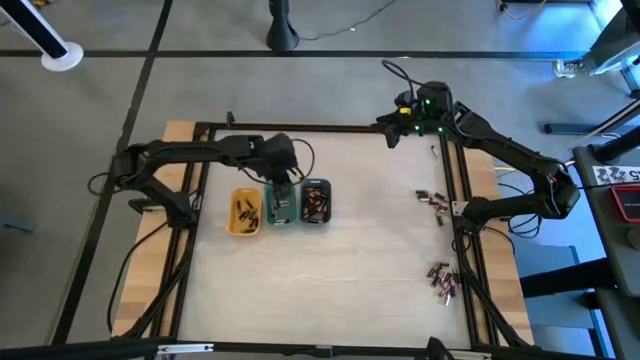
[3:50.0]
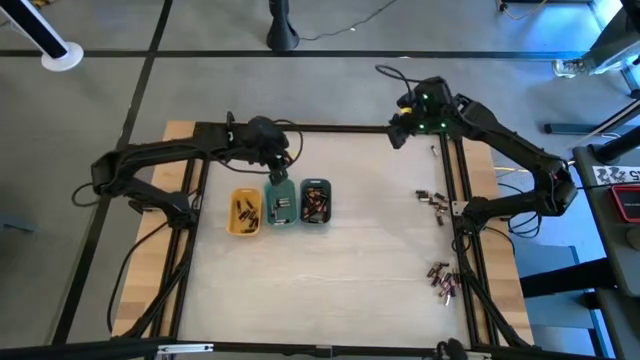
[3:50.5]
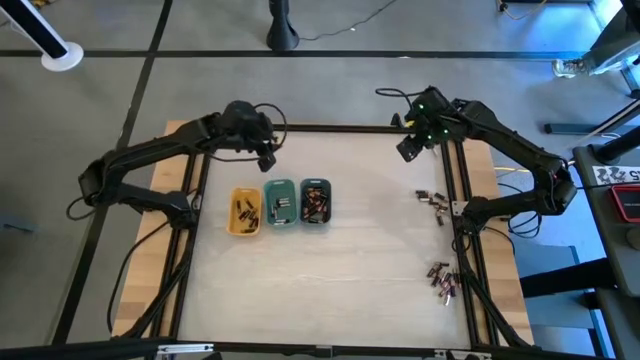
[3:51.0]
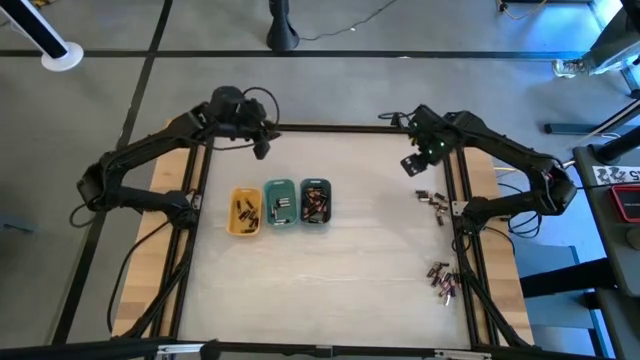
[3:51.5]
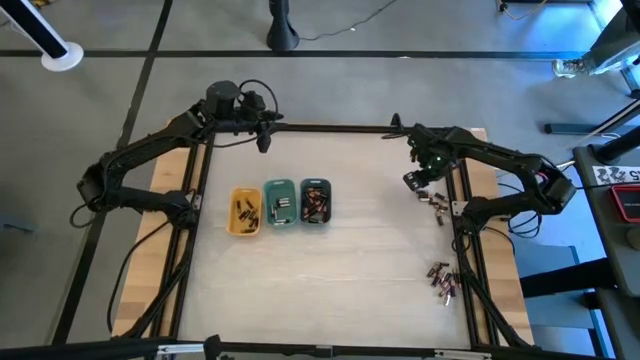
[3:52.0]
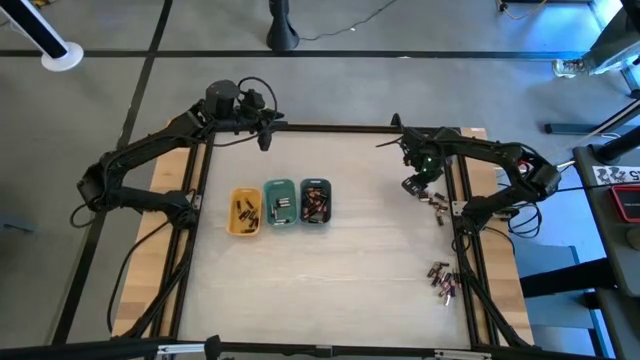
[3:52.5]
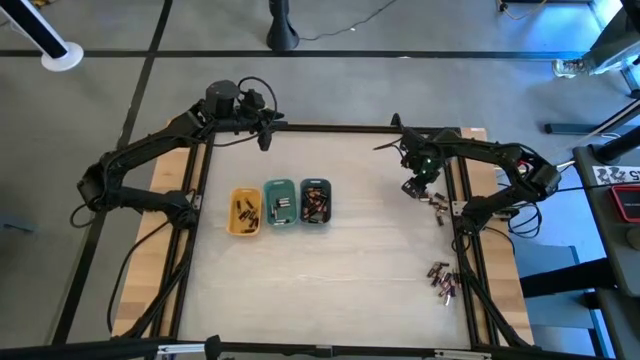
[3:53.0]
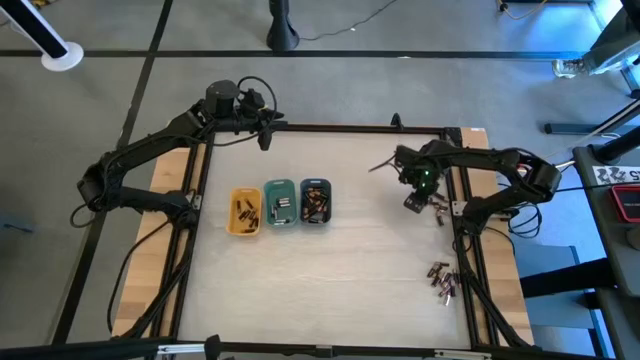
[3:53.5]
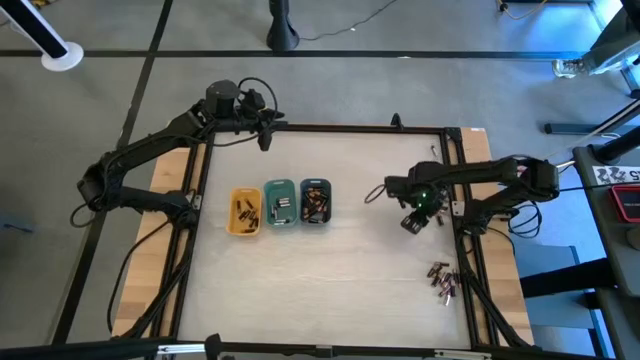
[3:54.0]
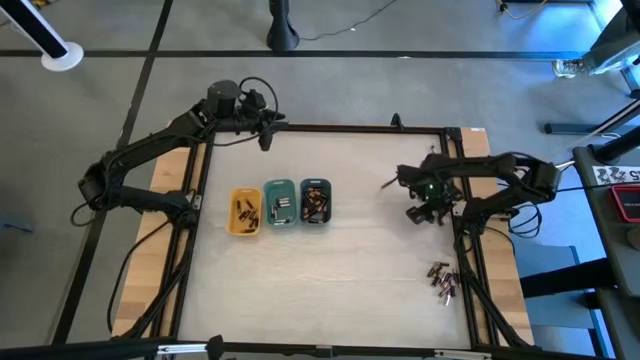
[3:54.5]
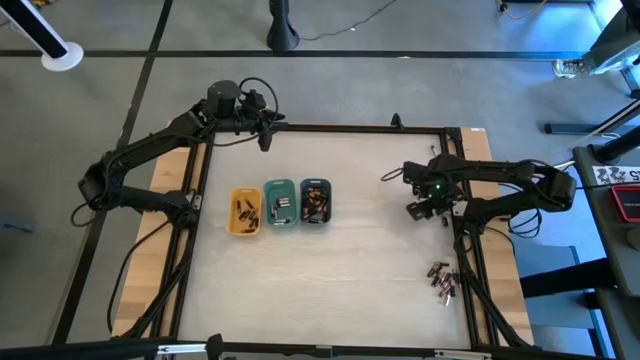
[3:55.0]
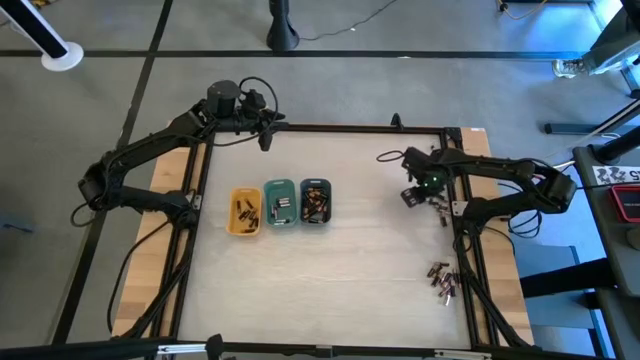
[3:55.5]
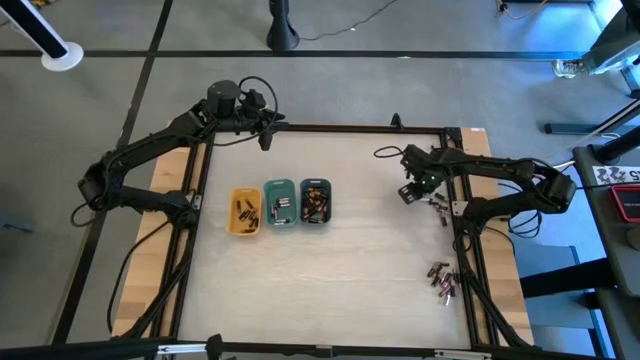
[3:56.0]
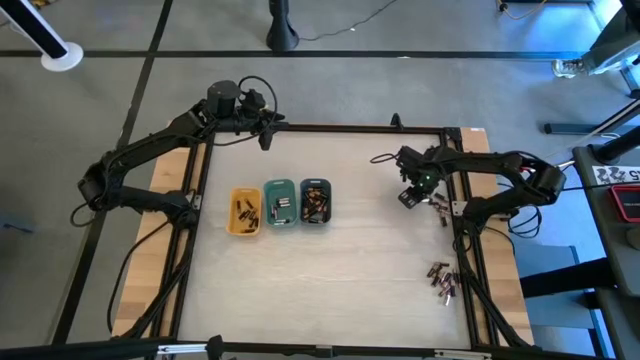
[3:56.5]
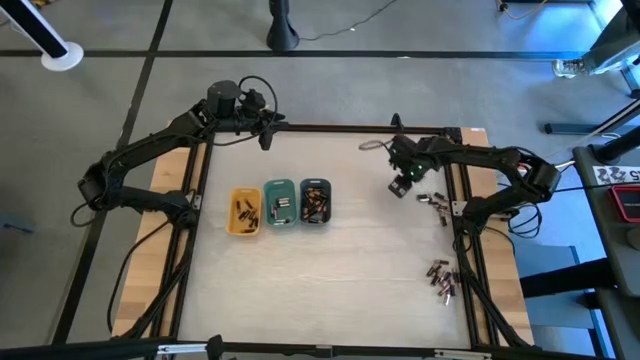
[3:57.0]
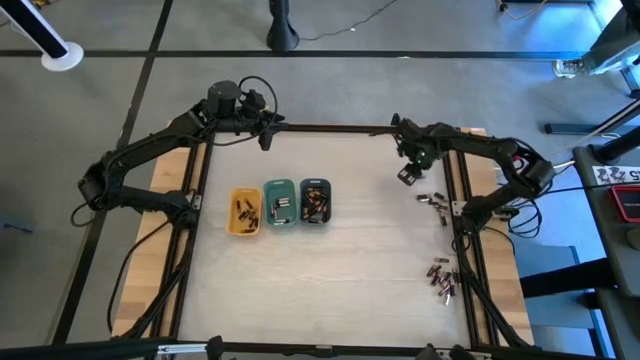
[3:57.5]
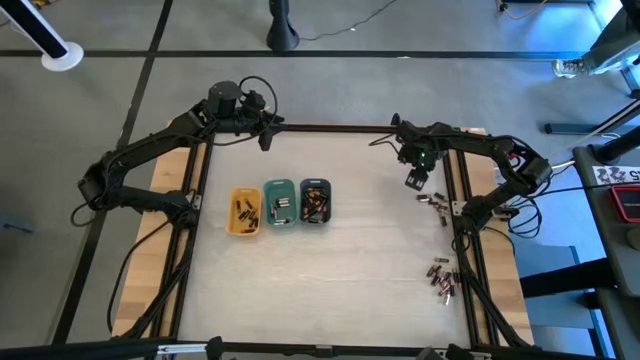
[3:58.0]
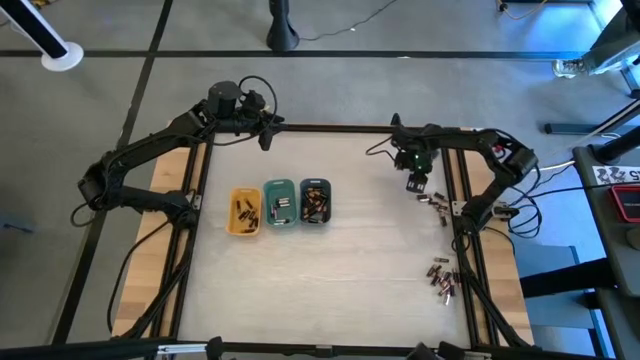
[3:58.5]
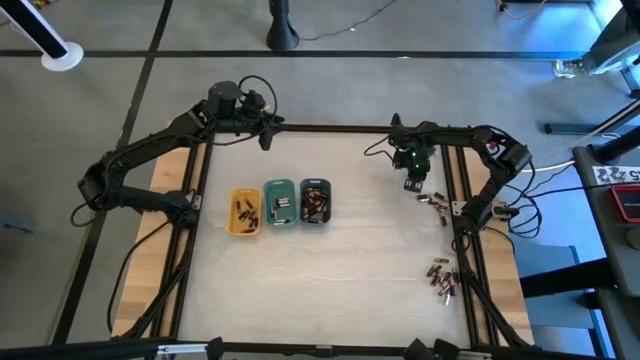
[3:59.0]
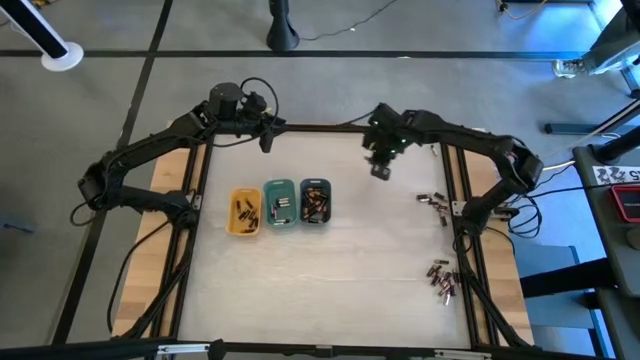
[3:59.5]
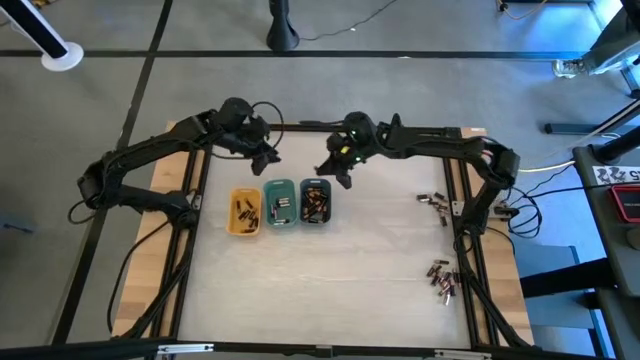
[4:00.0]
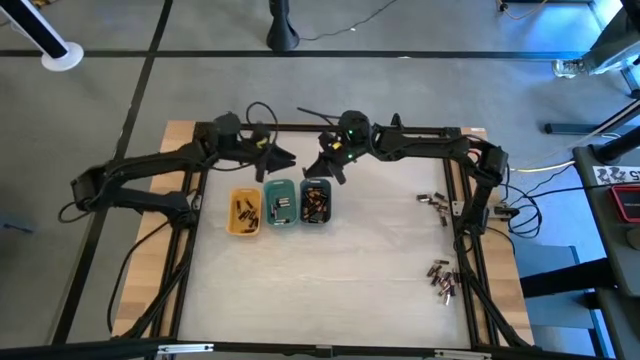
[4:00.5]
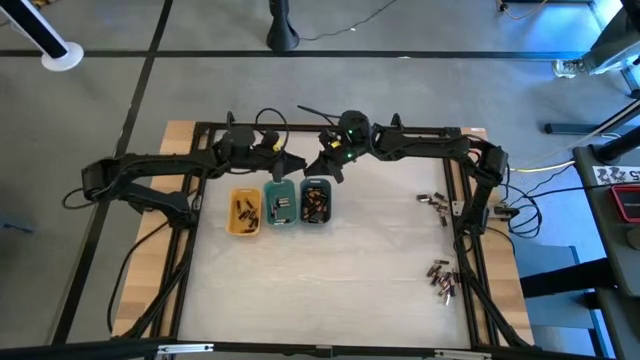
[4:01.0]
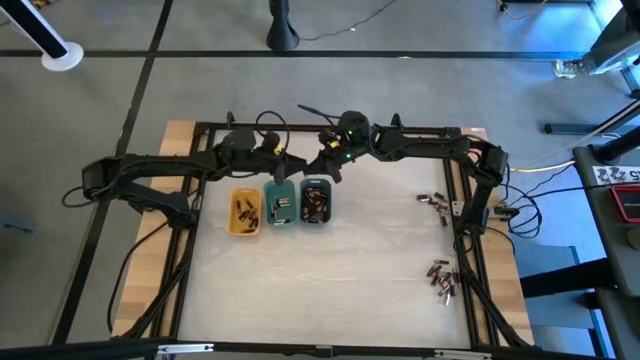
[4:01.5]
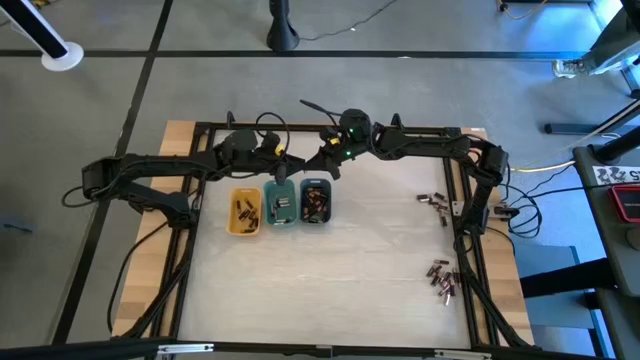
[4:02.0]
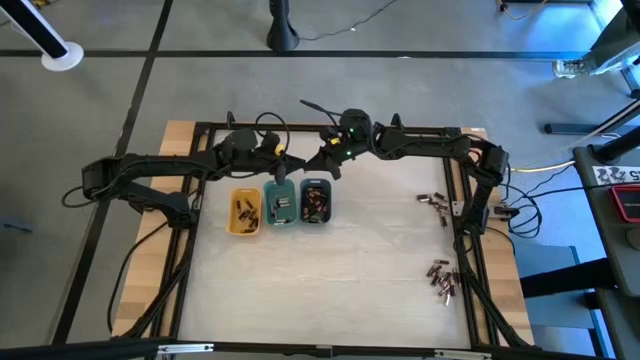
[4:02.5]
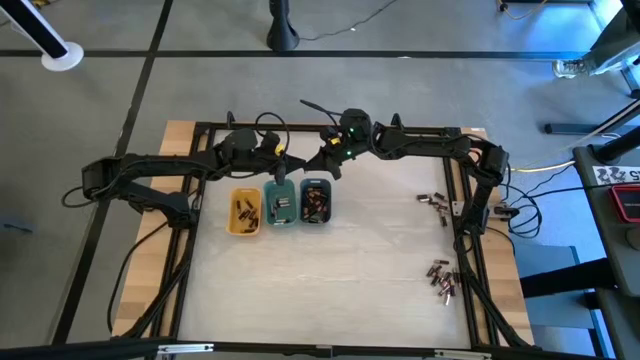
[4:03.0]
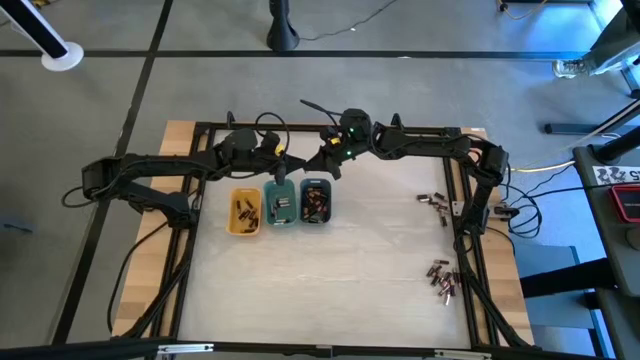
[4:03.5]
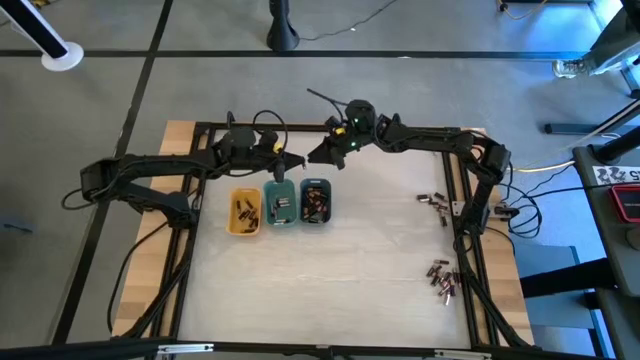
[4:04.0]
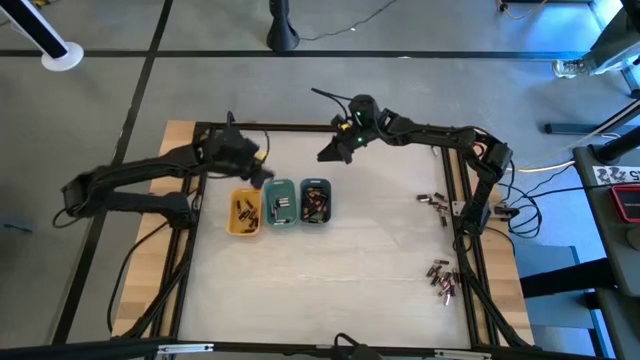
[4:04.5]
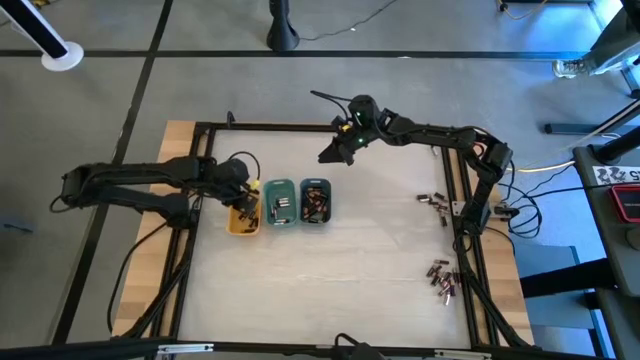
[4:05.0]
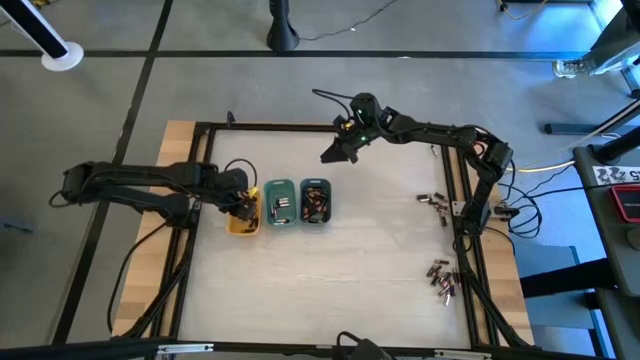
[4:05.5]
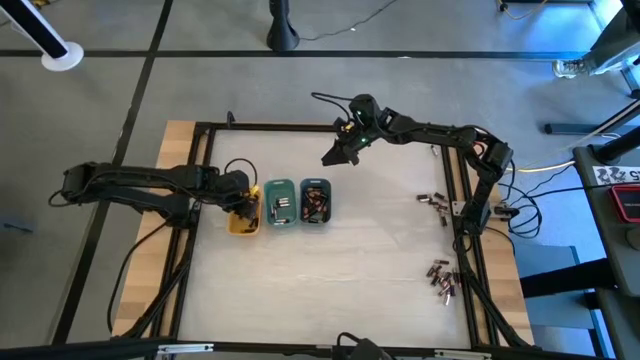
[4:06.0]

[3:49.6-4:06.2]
Task: Sort batteries
Put the small black battery into the yellow bin

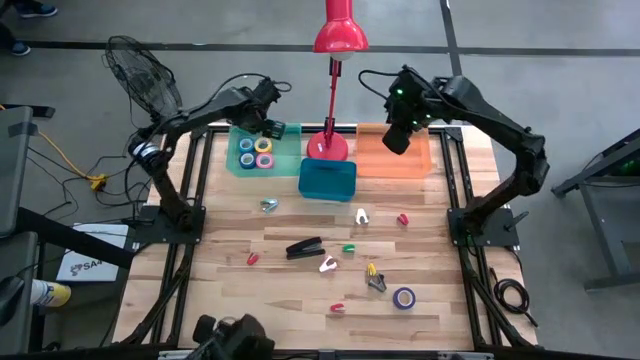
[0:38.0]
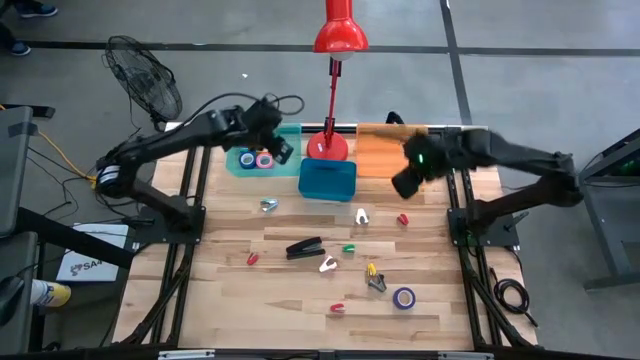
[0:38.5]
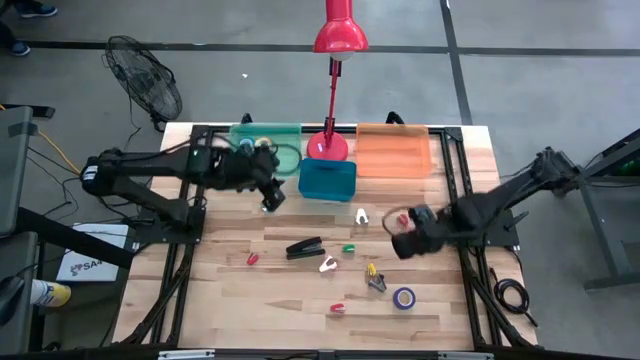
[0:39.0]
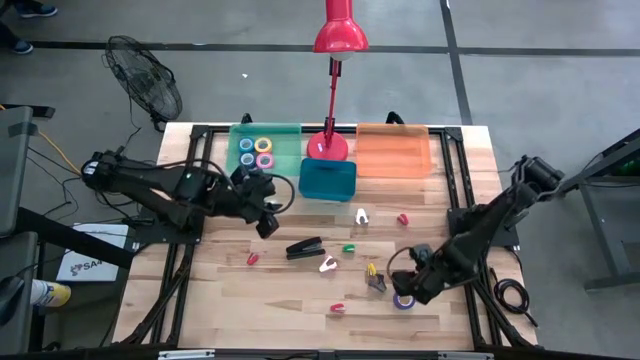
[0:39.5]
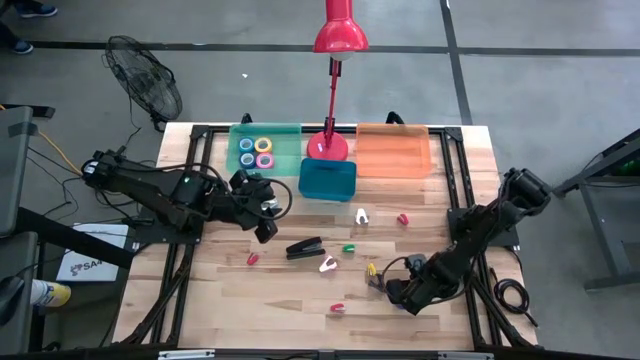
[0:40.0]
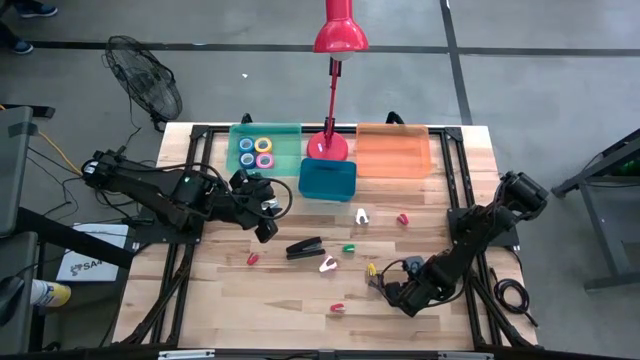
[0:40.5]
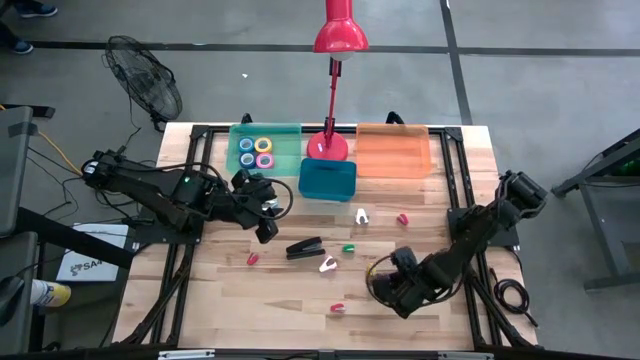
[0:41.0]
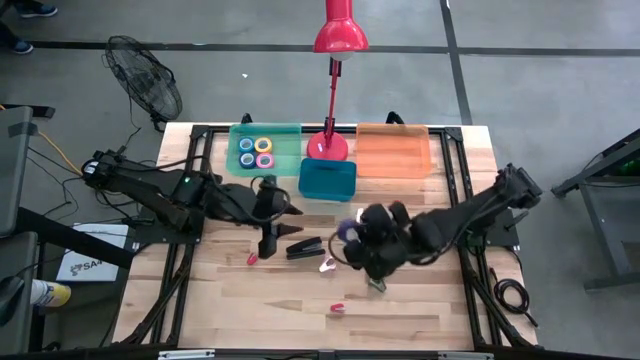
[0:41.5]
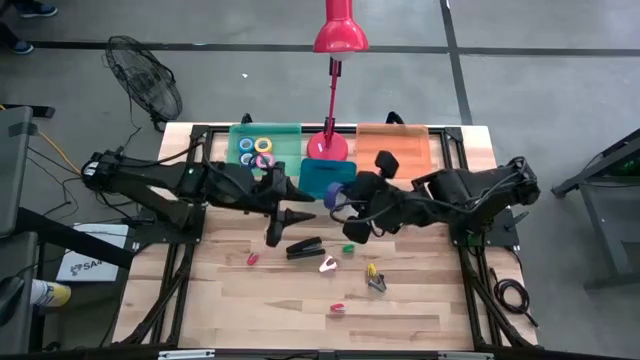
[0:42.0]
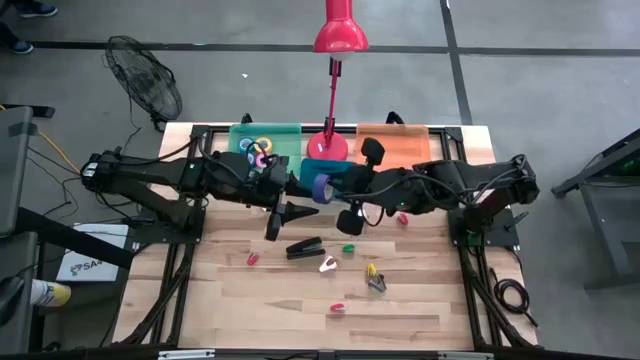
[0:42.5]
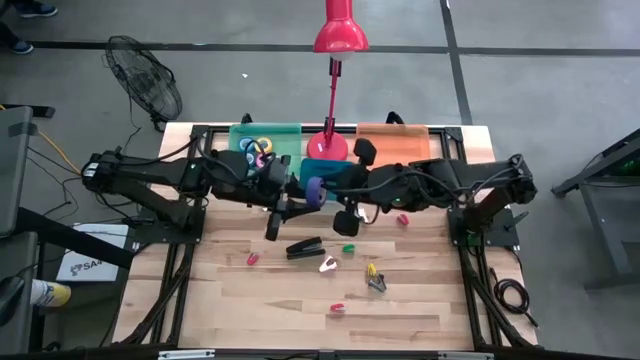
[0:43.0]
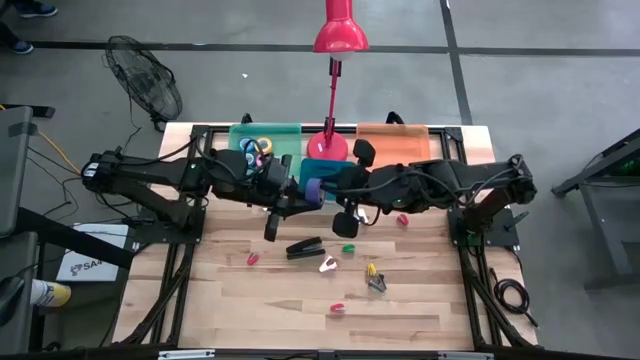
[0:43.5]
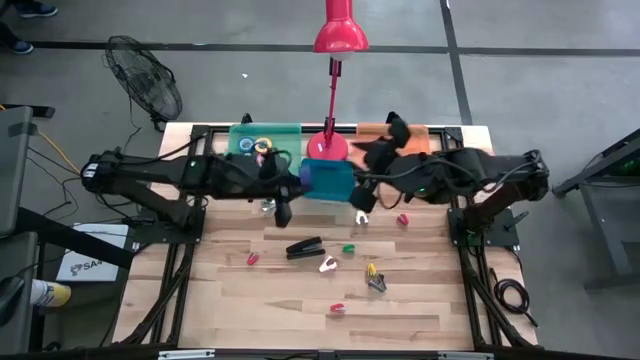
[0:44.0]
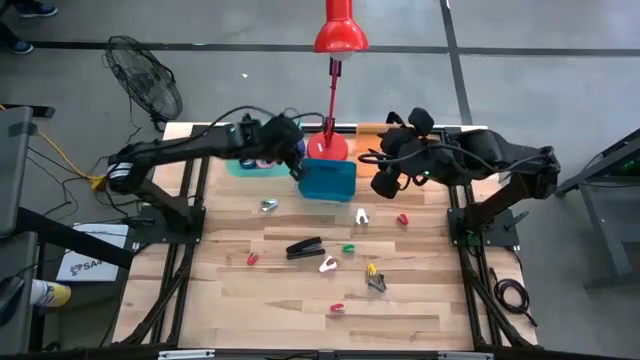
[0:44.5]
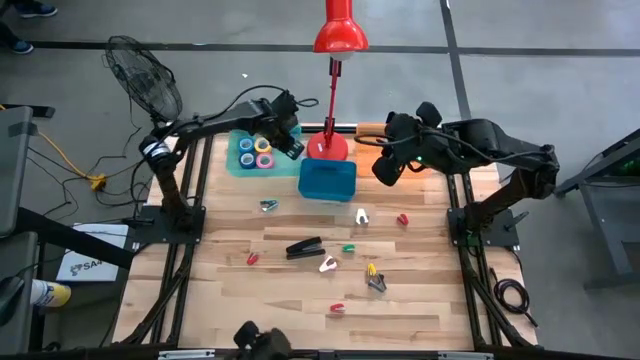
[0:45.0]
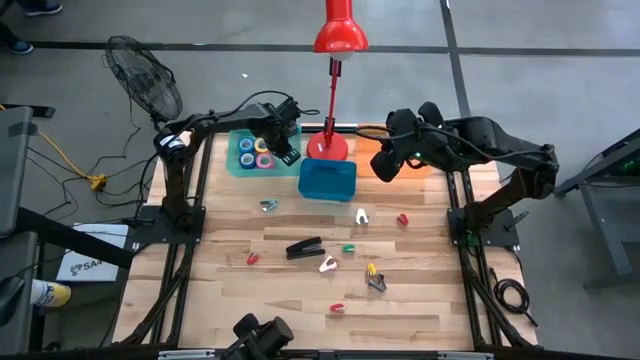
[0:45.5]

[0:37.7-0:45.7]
Task: Pick and place Stapler, Stapler remover, tape
Put the dark blue tape into the light green bin
